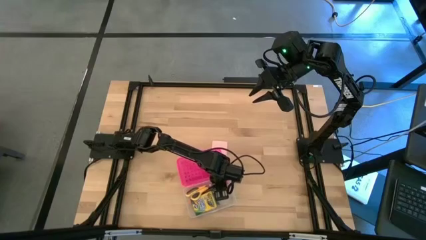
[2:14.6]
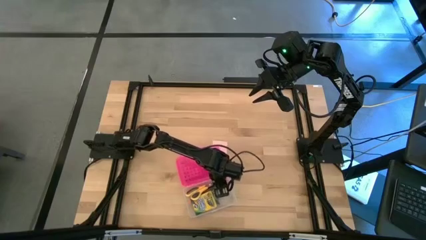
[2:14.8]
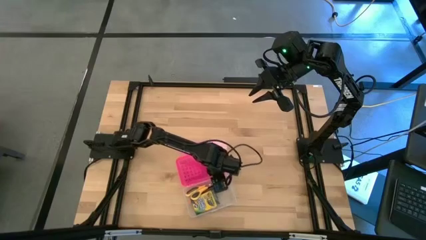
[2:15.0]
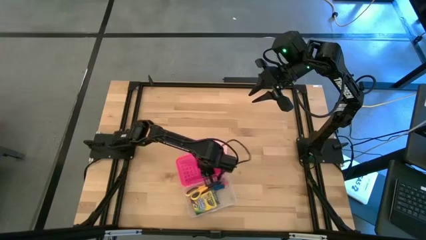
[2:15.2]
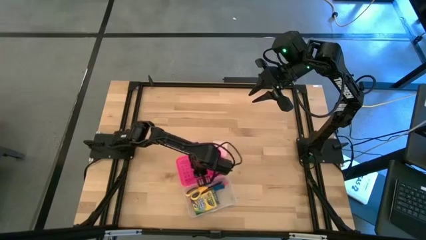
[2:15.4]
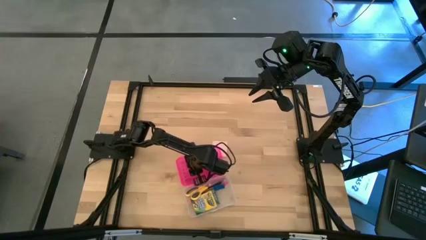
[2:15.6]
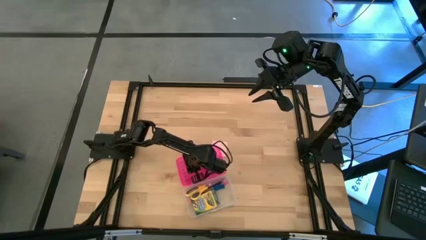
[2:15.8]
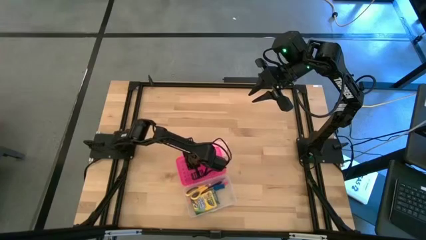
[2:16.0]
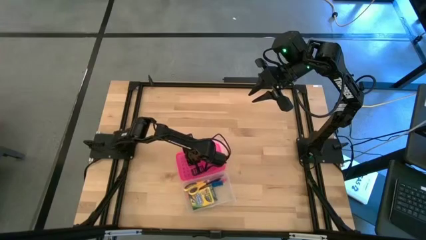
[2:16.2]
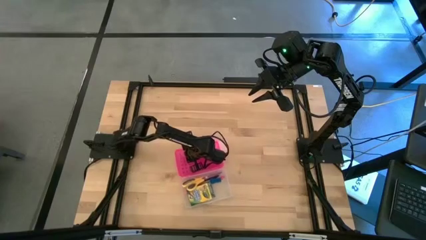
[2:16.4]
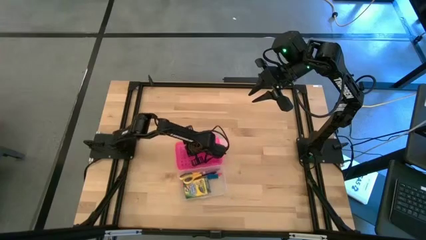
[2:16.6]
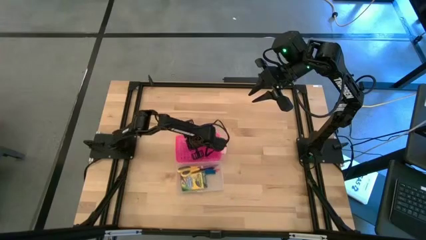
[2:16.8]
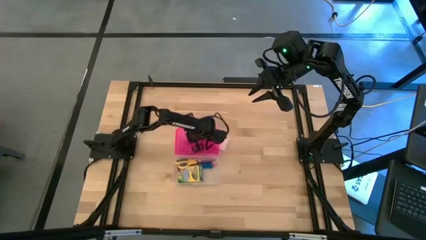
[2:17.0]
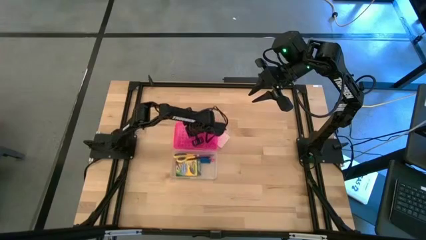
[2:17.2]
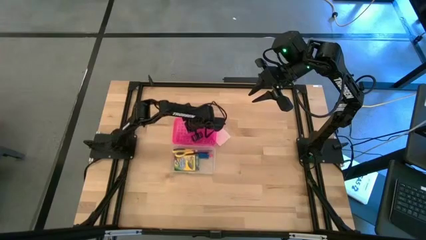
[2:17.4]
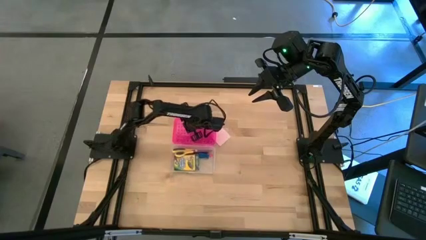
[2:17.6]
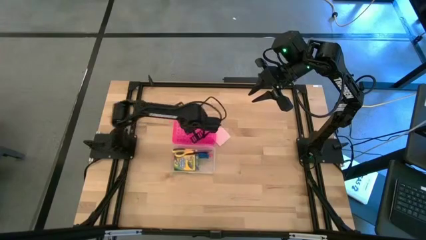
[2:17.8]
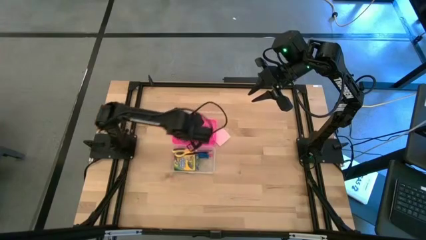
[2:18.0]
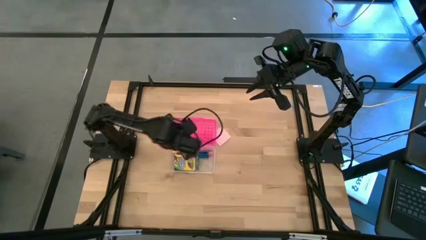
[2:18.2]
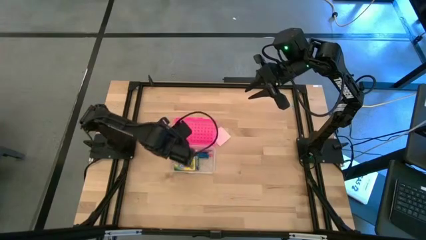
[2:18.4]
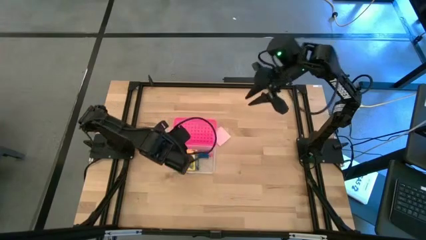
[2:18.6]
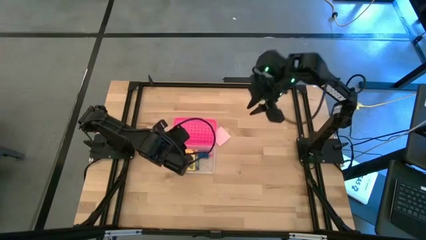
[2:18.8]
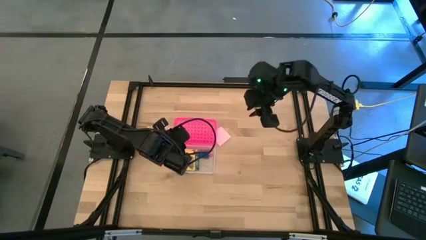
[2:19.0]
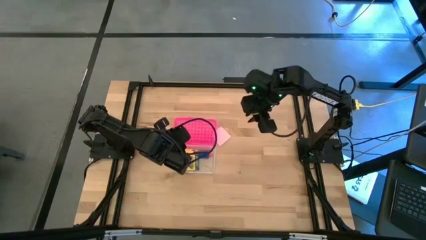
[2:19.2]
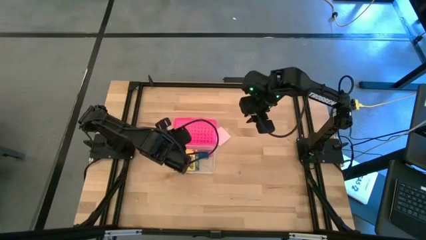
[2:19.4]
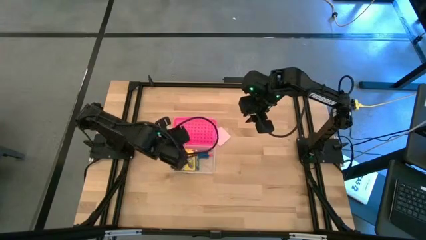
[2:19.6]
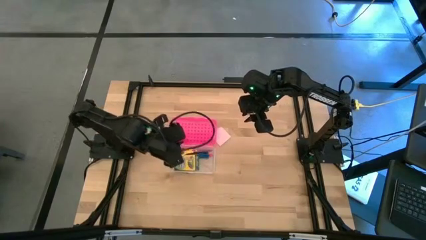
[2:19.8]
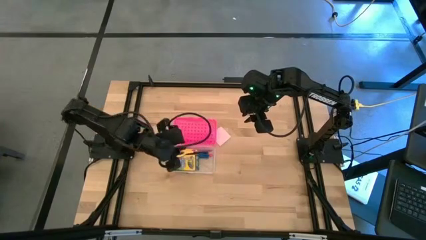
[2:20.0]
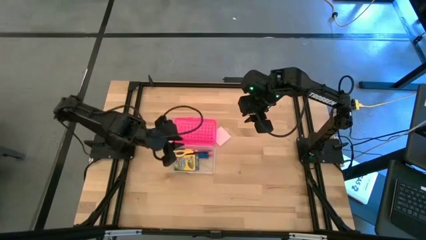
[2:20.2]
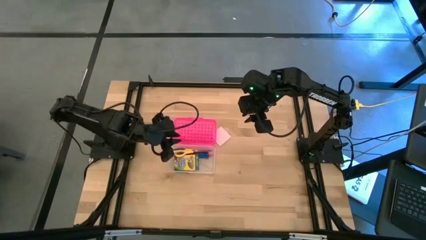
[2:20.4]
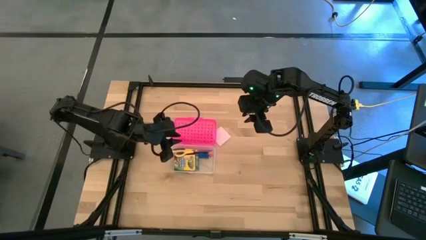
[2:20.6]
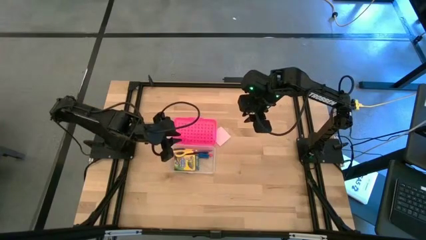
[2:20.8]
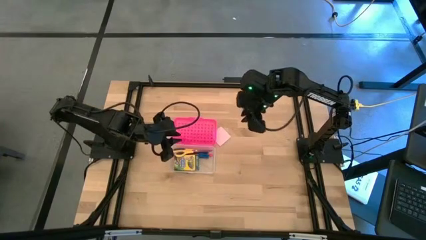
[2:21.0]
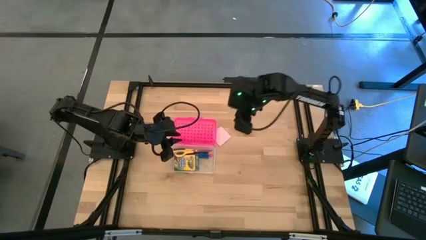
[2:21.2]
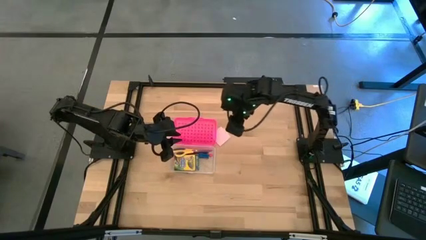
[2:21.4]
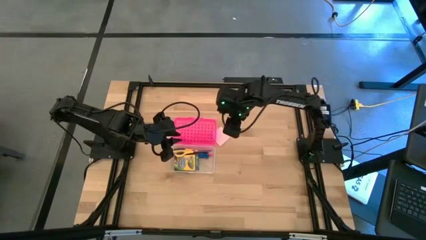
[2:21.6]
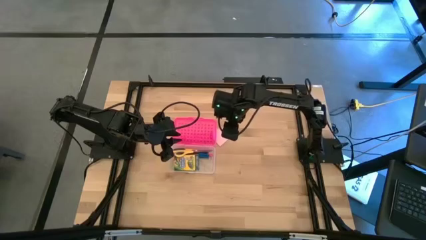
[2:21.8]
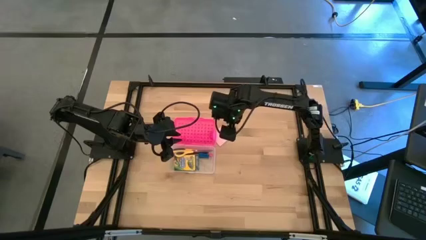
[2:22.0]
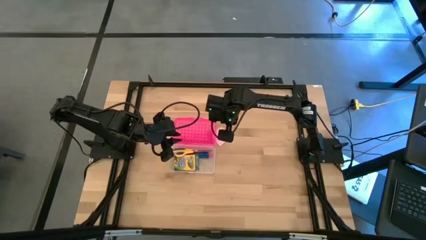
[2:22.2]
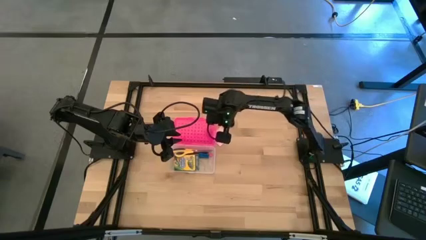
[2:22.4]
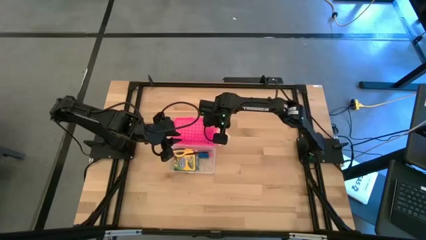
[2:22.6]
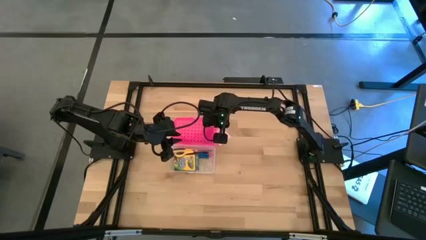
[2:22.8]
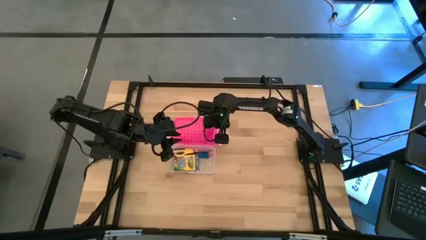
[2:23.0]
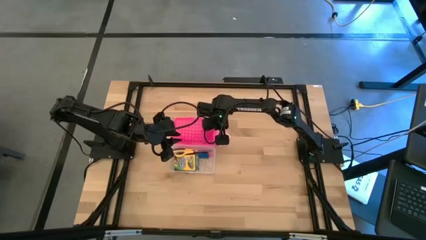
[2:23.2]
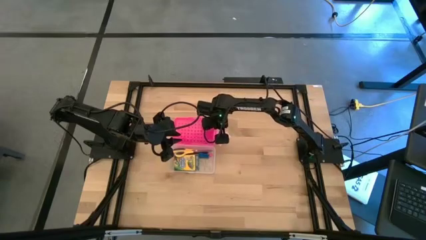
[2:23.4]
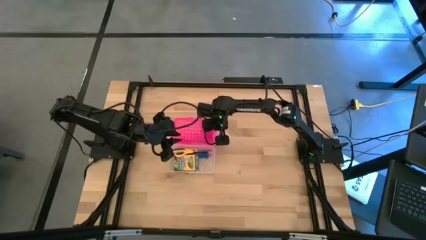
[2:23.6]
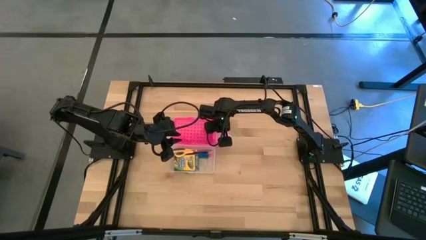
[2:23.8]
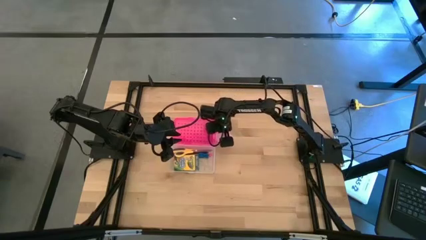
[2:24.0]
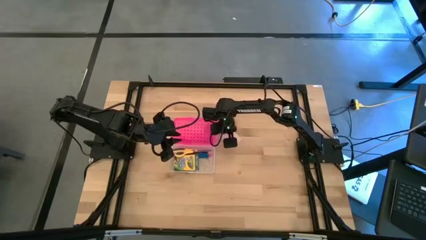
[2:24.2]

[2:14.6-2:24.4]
Task: Pack school essentials
Put the pink sticky note into the pink supply box

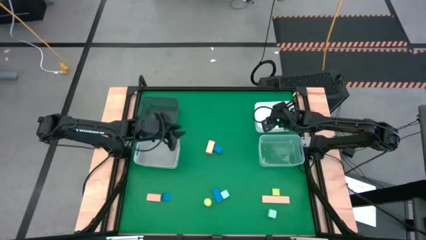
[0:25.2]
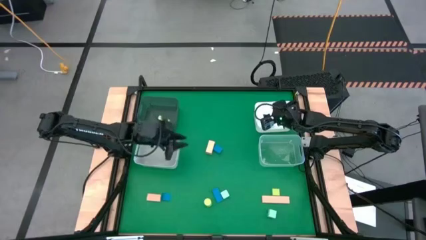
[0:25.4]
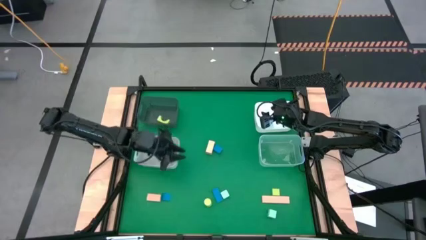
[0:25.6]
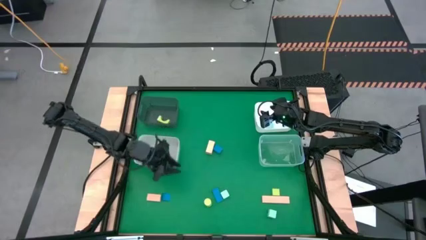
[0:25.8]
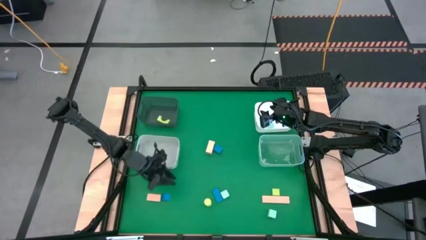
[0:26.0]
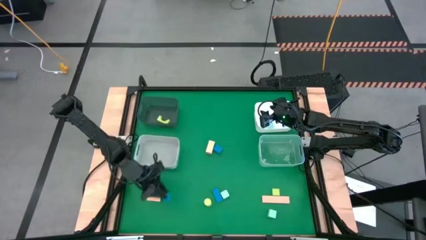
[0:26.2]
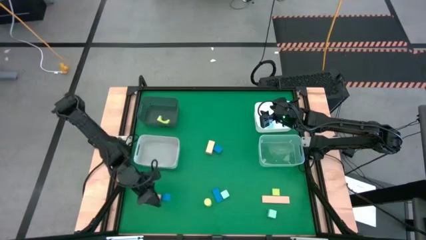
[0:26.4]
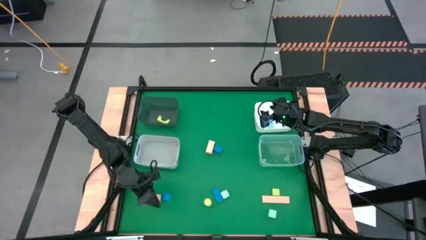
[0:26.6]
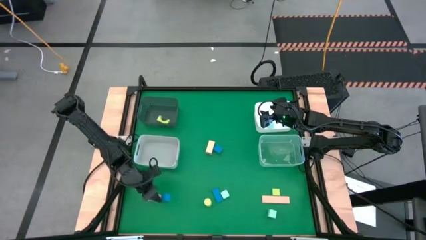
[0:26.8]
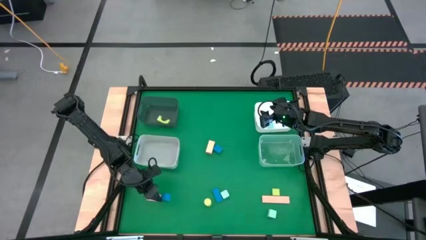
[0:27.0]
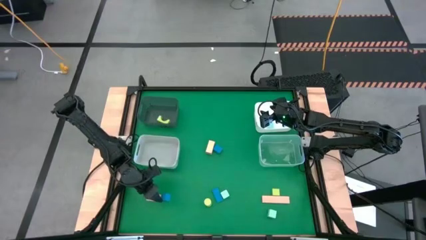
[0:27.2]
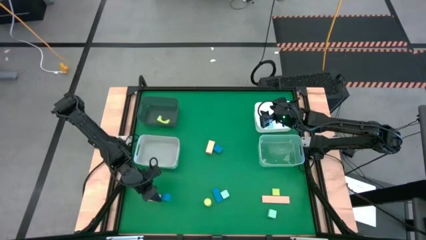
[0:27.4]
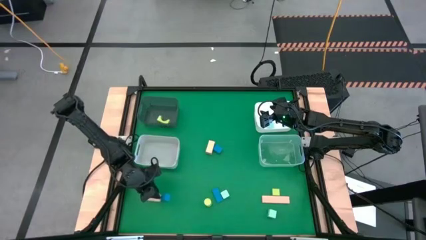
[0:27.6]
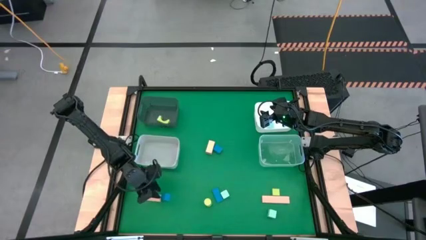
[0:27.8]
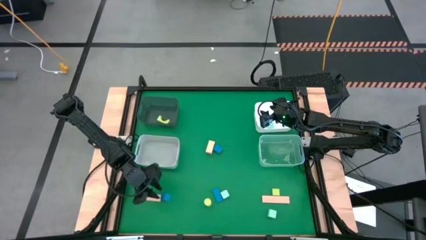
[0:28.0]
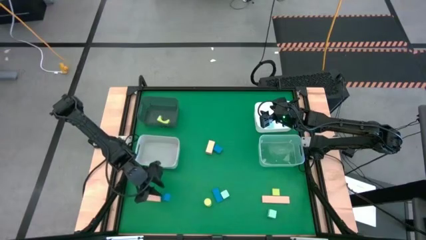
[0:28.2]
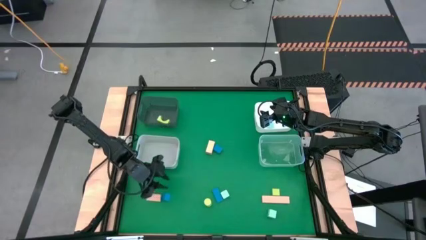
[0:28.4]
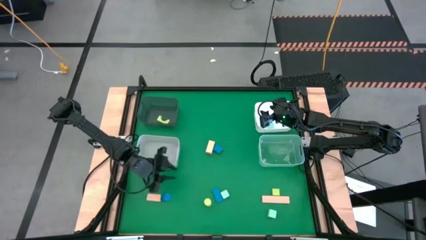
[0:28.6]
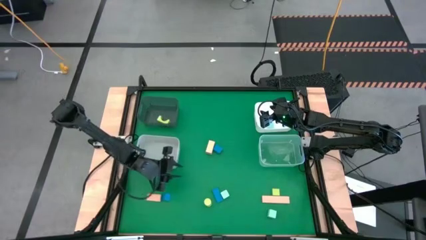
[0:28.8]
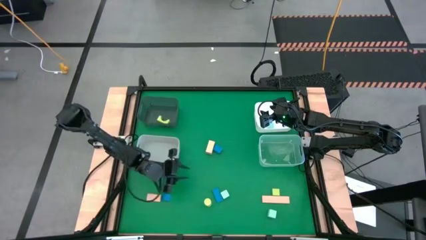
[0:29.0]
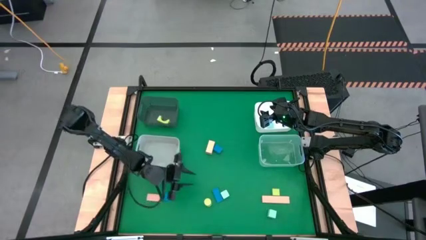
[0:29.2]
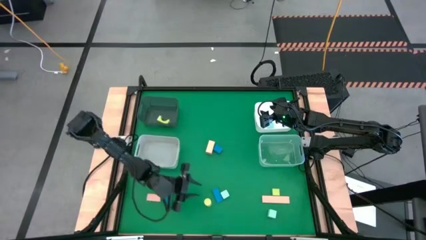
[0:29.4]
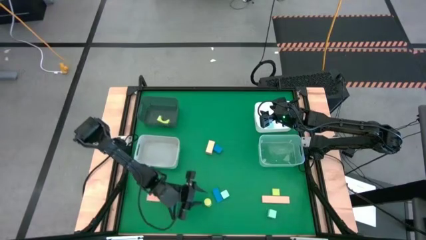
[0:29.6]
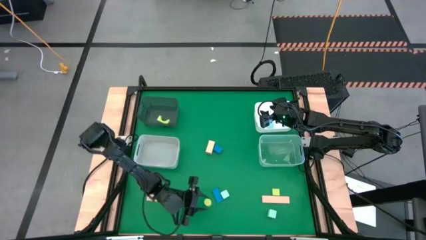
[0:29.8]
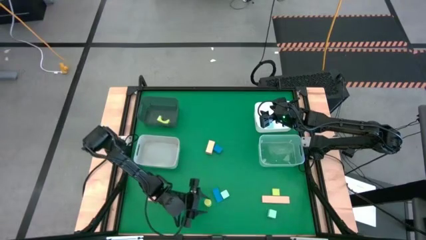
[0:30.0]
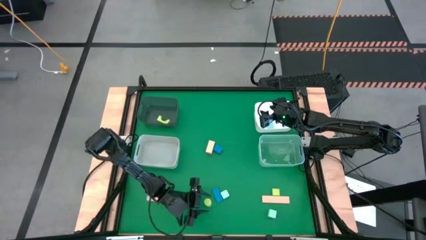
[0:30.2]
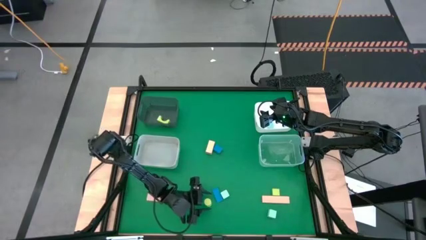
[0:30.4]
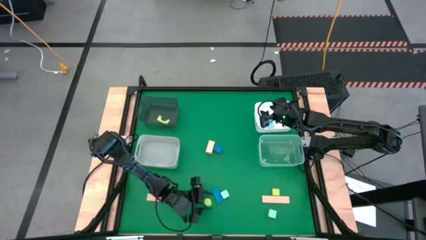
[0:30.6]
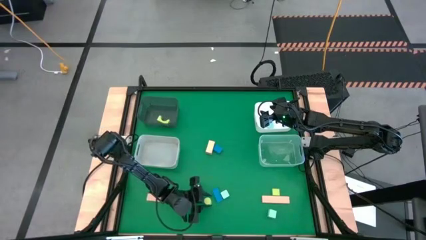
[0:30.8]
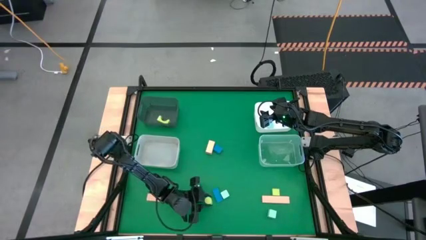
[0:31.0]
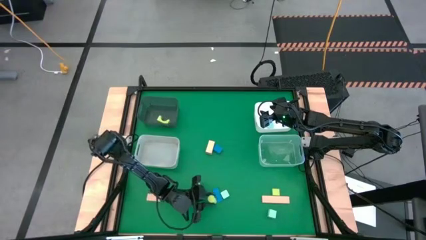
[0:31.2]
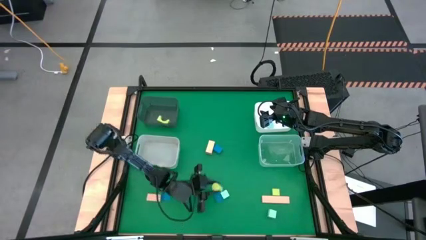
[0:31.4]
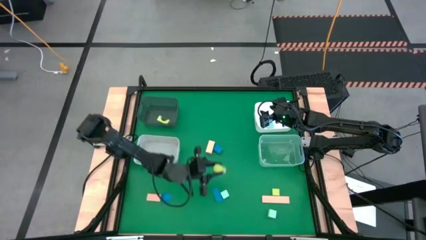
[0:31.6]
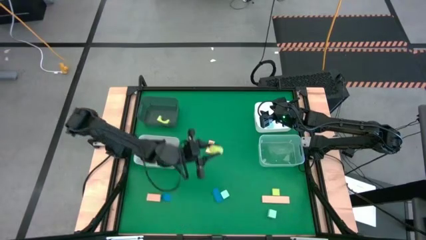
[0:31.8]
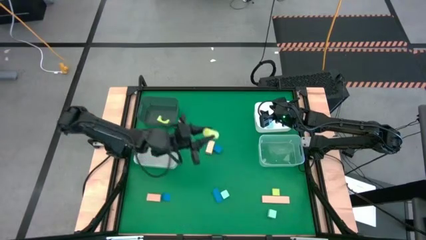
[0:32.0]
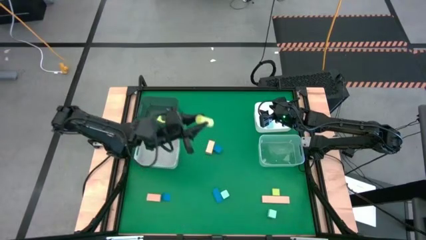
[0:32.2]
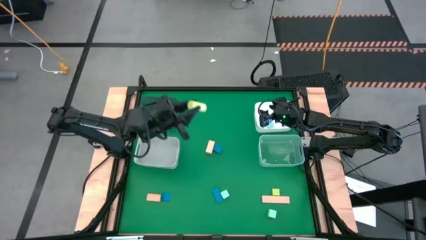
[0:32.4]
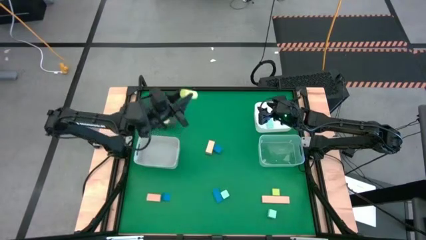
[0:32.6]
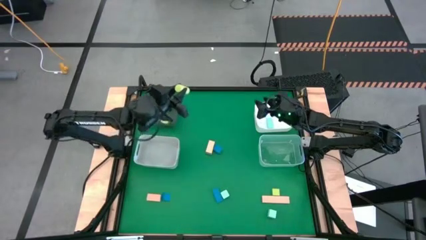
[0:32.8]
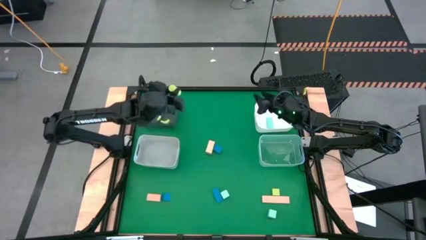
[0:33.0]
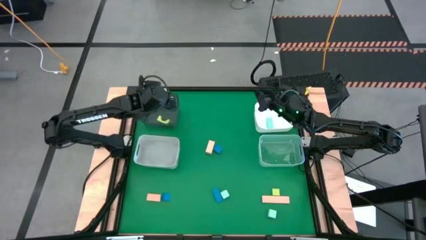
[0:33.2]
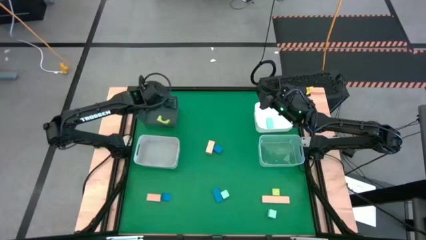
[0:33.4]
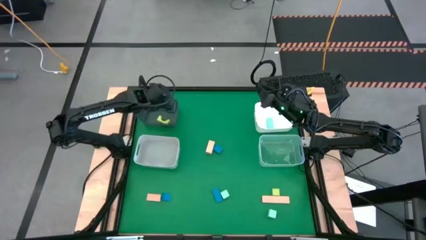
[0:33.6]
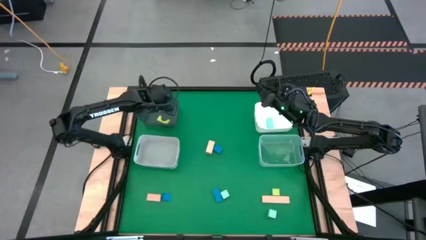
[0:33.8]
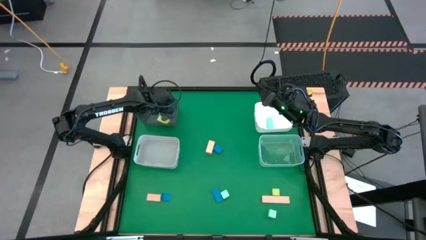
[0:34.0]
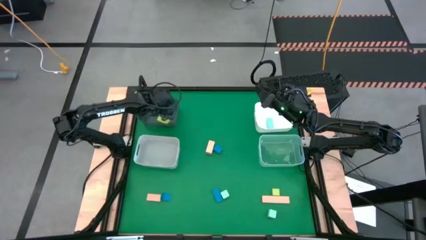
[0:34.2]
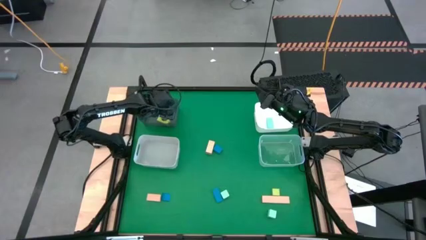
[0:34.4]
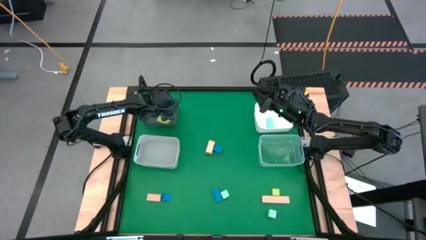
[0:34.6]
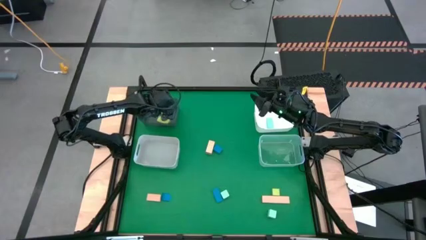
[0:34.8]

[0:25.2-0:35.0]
Task: Sort & place blocks by color
Put the yellow cylindrical block into the black transparent bin
